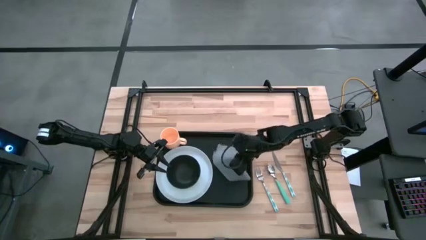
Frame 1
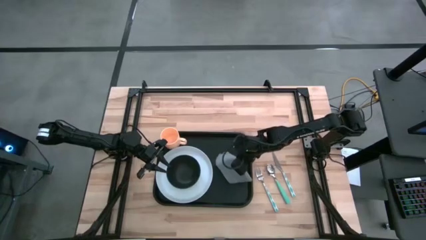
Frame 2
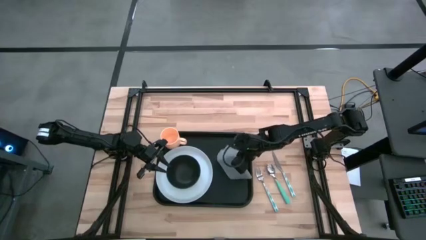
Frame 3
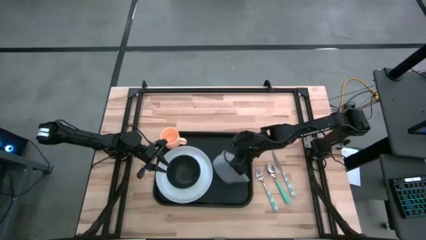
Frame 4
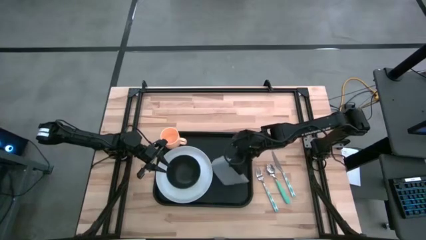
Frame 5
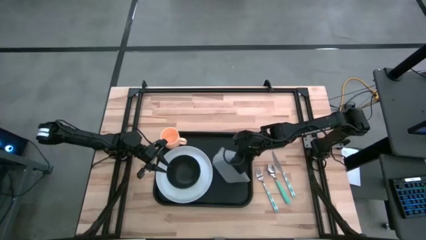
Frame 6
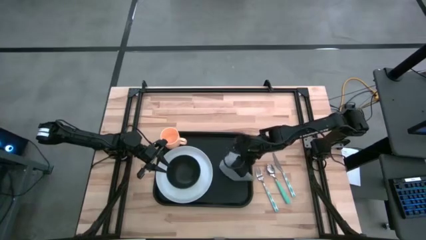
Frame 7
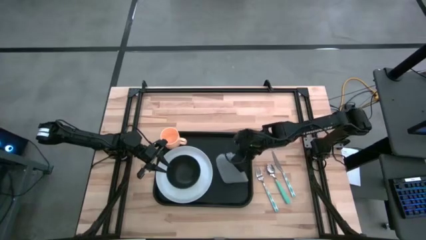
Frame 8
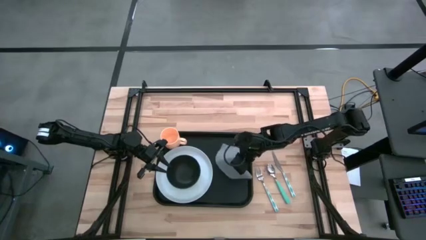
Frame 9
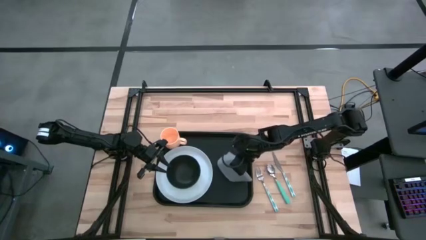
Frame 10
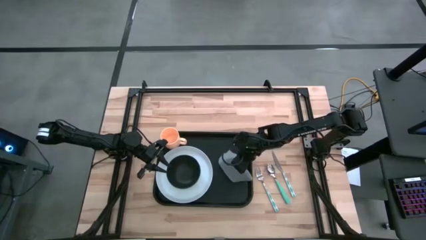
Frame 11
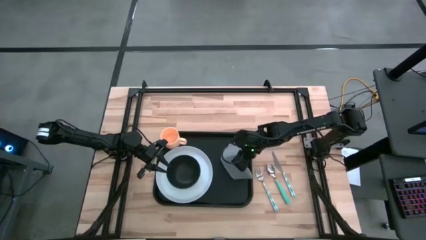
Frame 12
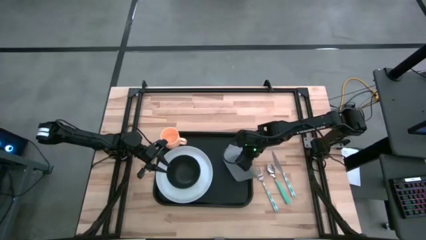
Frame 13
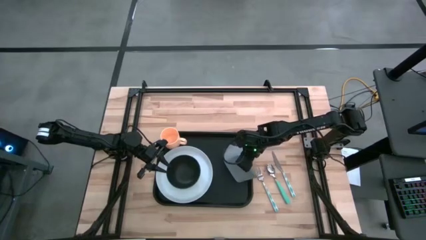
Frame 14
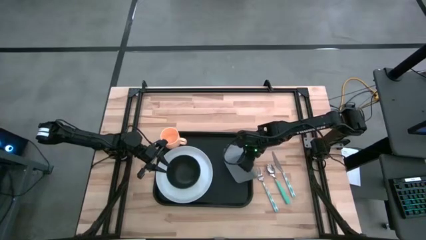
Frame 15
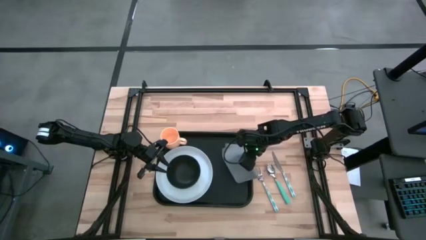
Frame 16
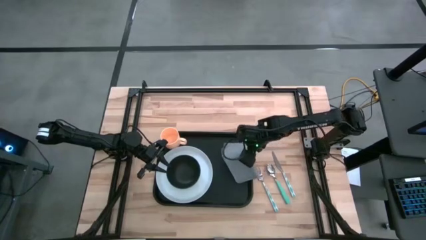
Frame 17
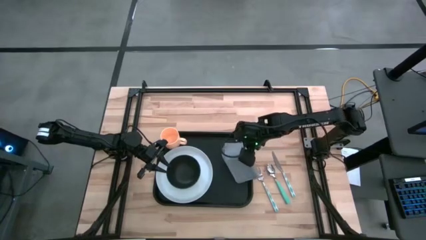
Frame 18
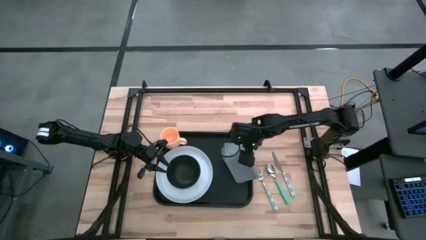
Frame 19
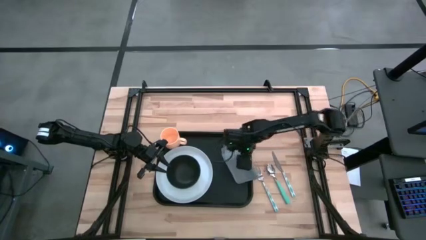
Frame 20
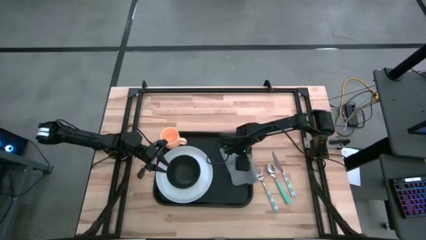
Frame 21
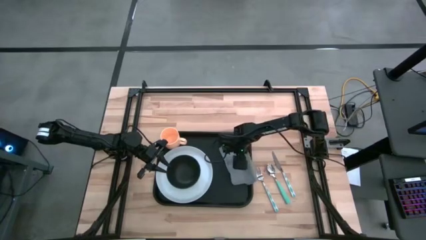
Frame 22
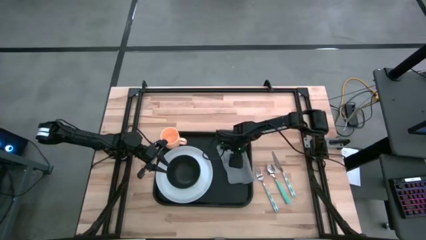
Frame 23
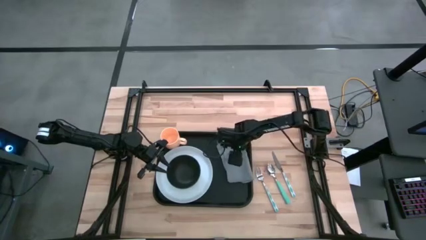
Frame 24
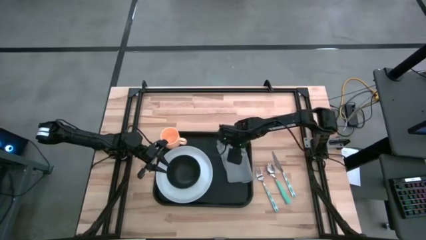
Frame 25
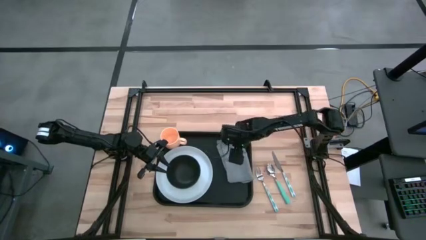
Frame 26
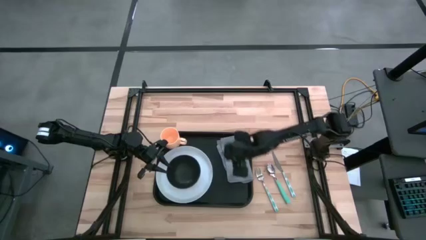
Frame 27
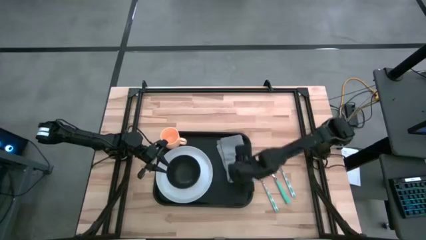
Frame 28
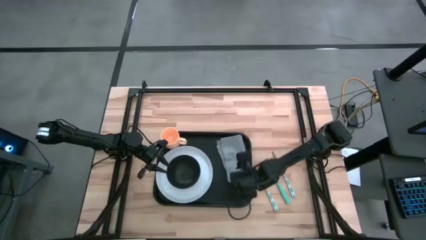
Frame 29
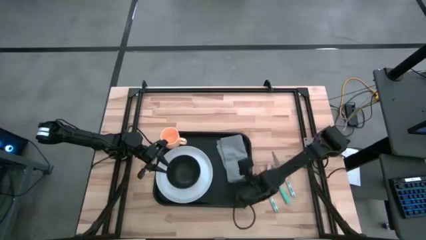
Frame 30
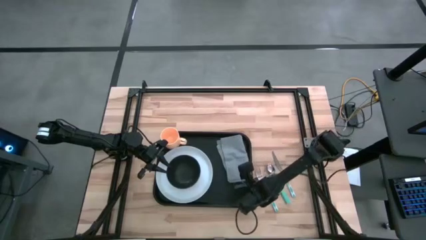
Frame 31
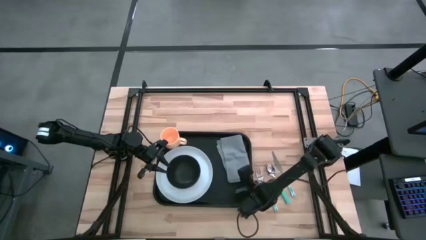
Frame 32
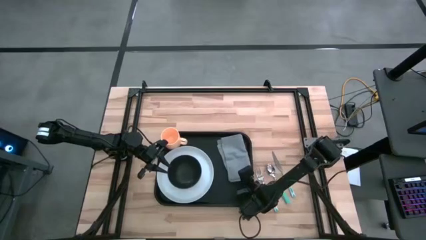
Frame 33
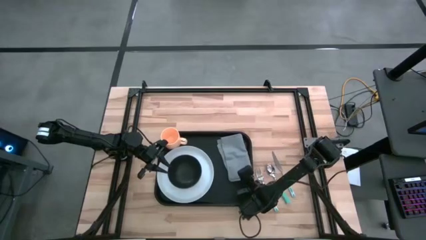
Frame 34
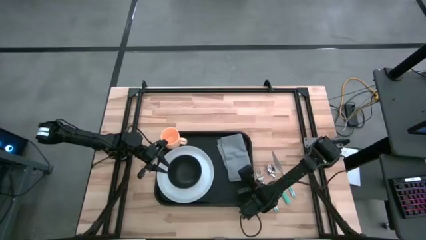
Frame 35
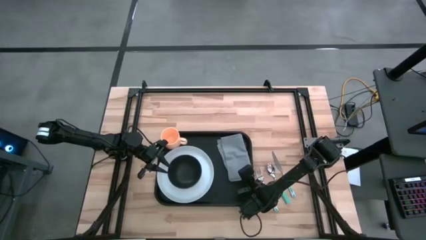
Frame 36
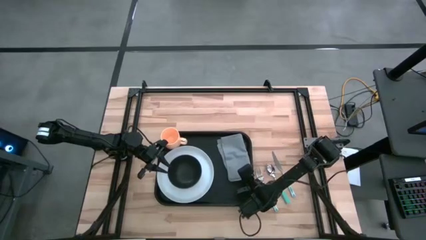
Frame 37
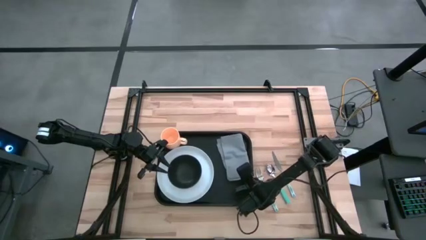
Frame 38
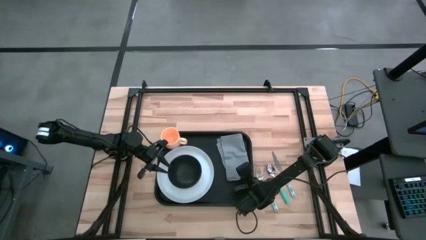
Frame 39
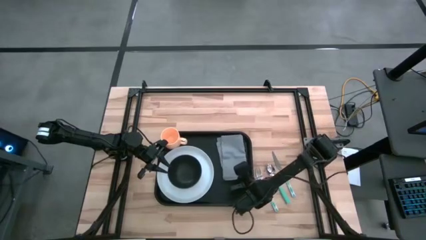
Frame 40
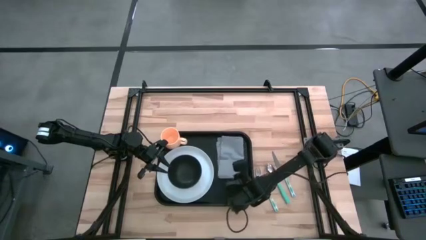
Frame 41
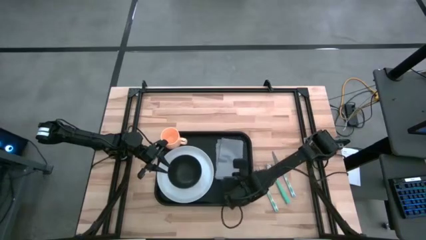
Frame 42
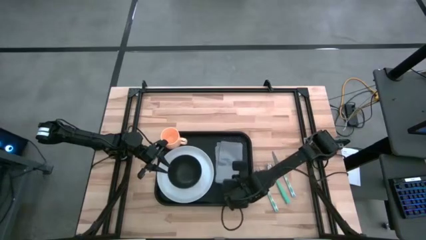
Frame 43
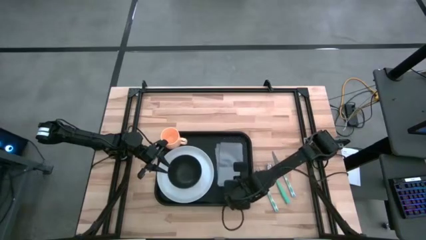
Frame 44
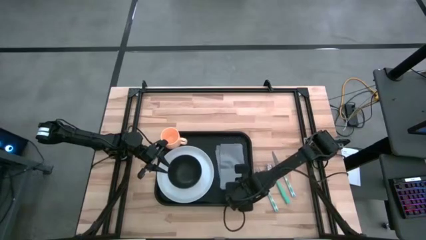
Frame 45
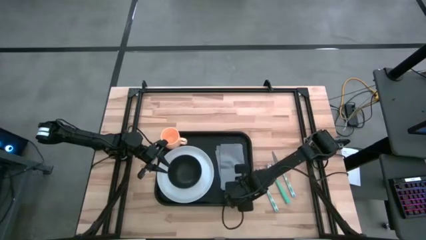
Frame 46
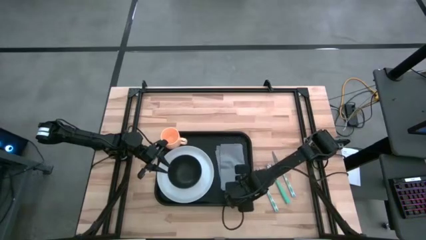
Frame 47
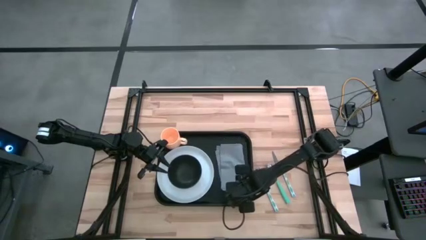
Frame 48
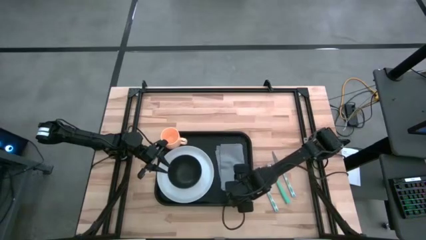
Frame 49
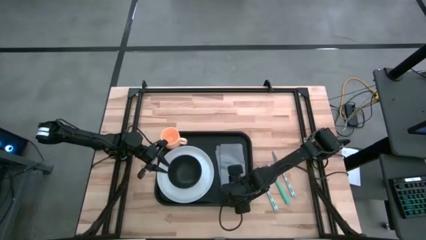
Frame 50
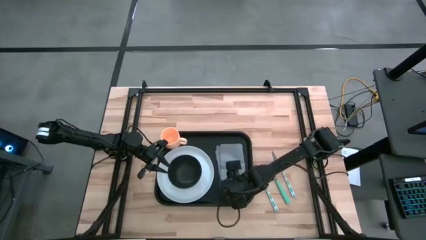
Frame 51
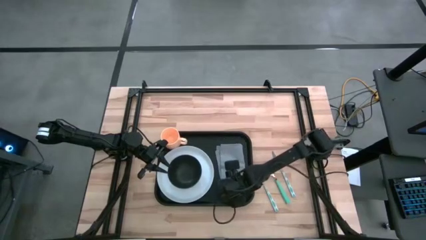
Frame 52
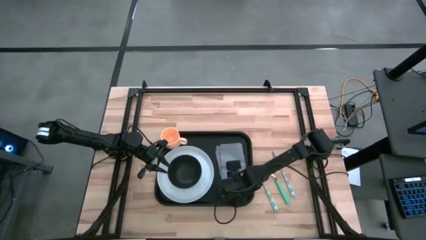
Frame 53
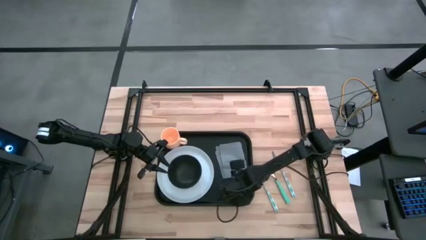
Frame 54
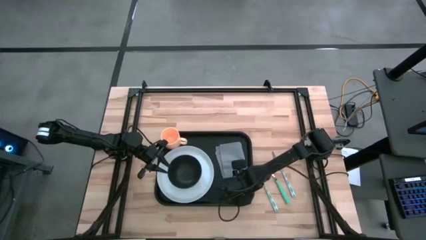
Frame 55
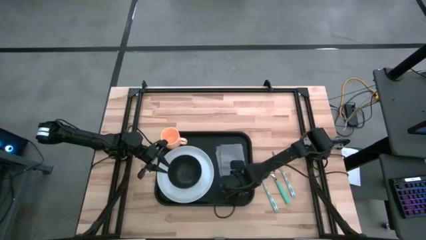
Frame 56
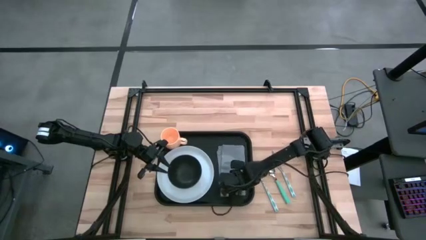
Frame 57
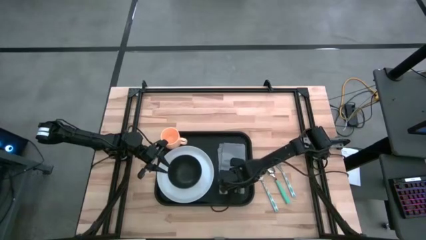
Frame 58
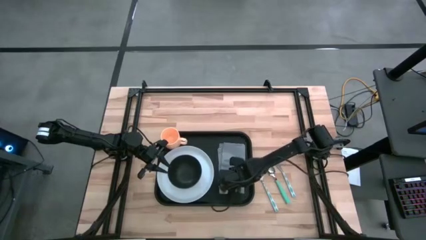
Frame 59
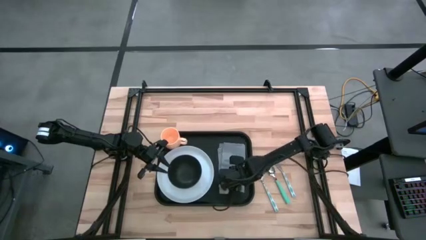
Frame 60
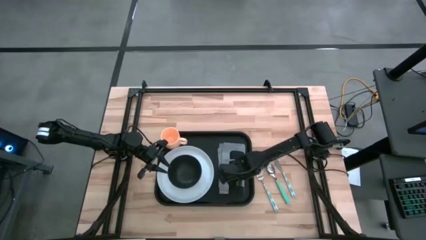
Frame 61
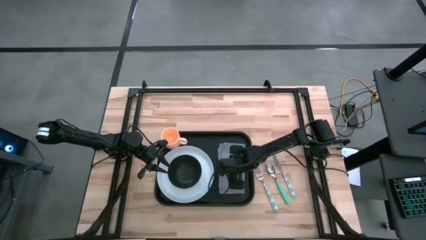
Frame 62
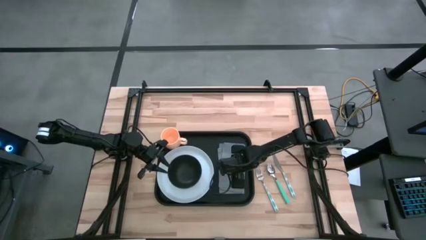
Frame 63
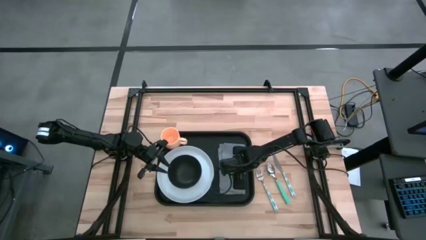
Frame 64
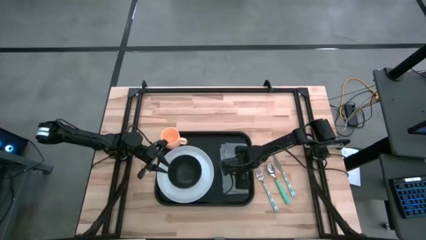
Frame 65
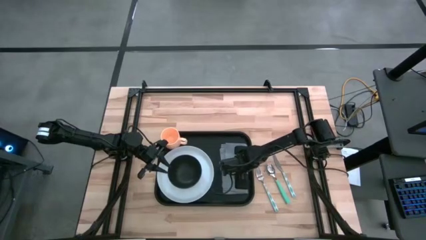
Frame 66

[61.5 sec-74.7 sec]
Task: Set up tray
Put the napkin on the serving tray to the right of the plate
